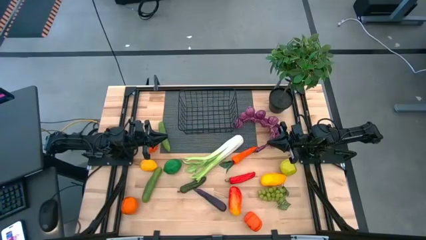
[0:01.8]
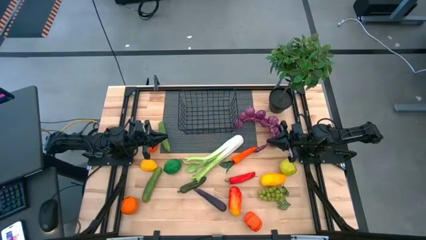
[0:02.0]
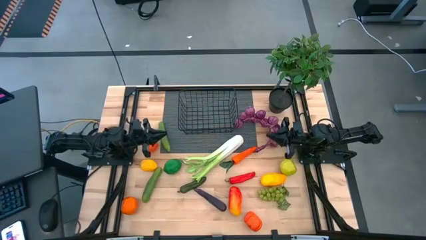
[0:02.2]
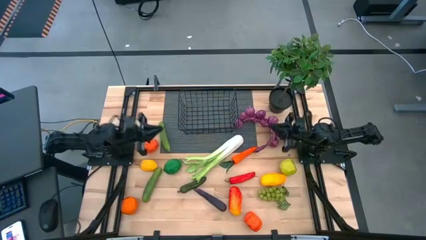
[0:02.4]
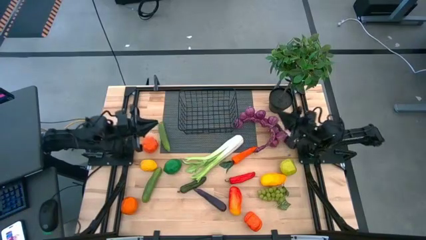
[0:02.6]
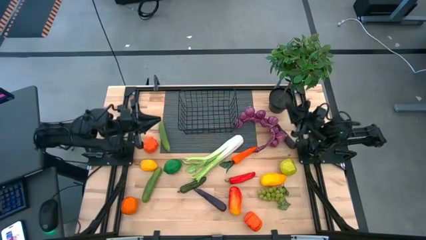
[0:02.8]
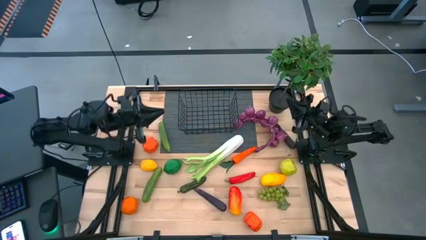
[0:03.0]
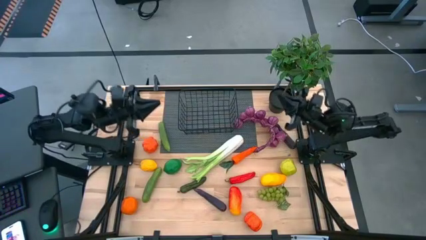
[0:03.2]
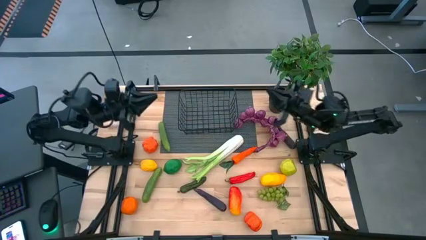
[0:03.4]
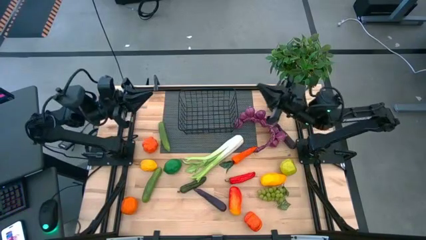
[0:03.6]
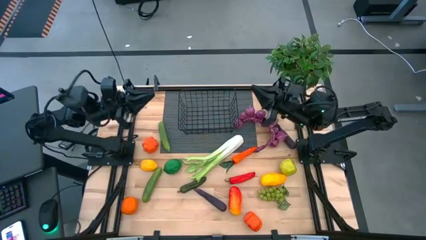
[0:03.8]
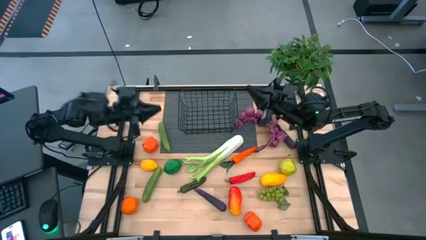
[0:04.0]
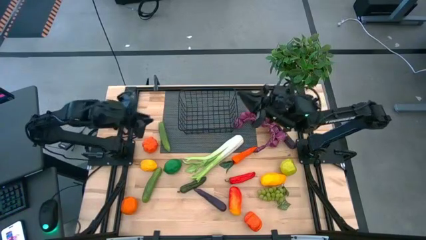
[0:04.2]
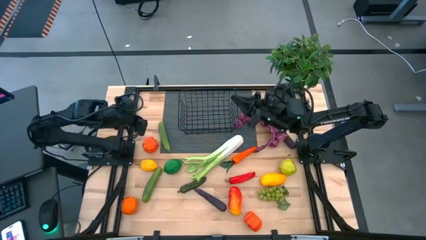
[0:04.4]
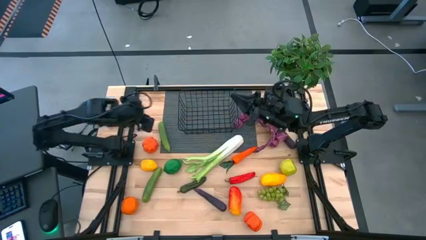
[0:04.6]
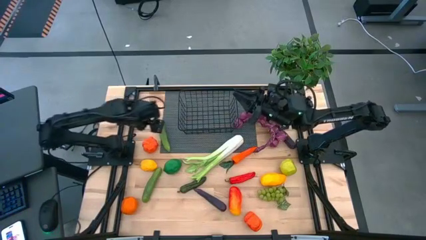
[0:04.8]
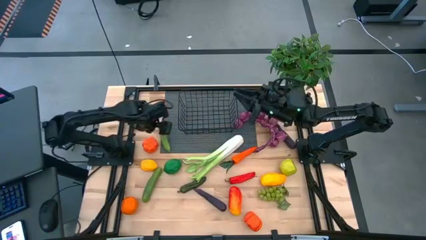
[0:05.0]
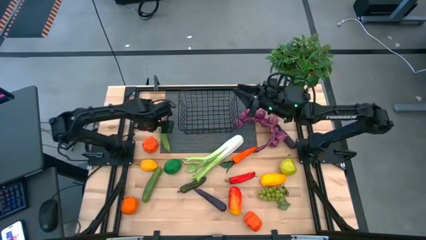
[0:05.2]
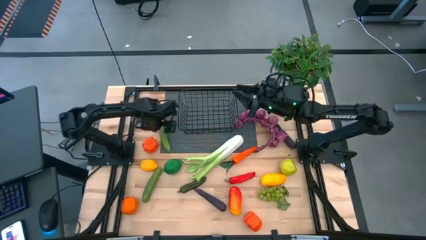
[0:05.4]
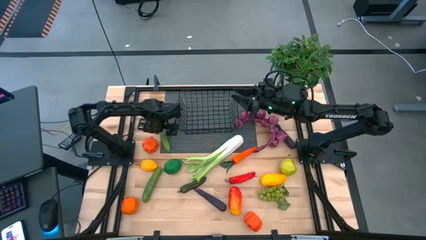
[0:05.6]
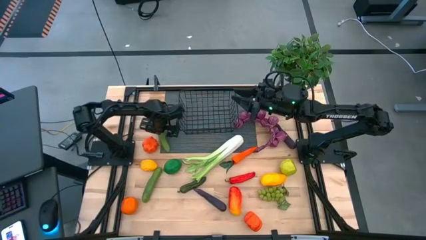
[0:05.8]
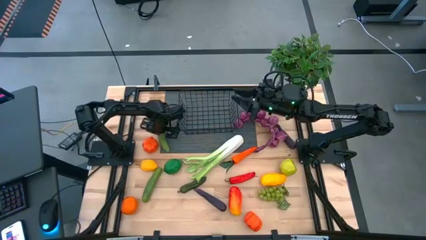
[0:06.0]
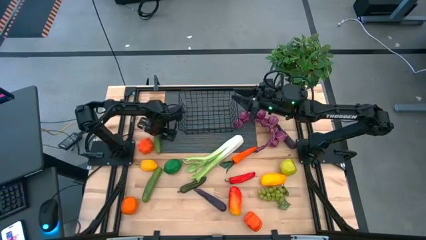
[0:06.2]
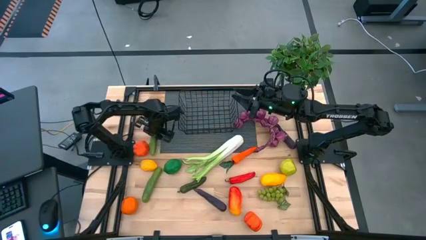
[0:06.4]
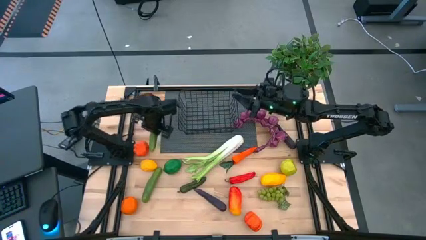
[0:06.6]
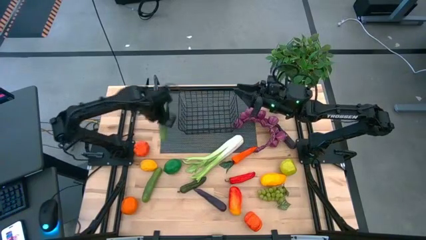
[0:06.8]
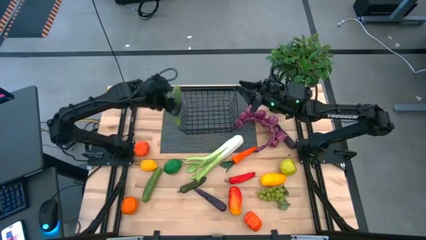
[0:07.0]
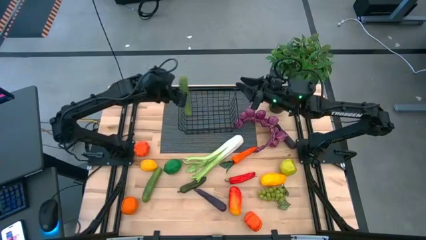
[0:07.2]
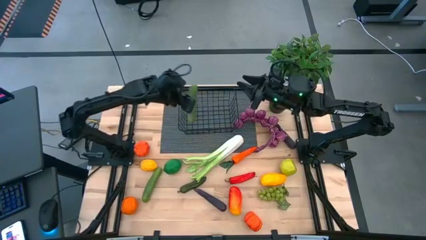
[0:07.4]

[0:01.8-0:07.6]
Task: Build produce basket
Put the top cucumber into the wire basket

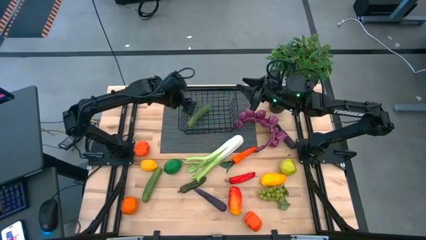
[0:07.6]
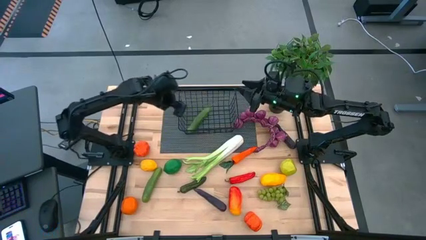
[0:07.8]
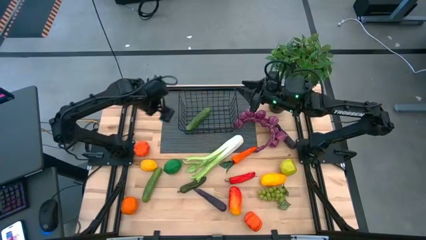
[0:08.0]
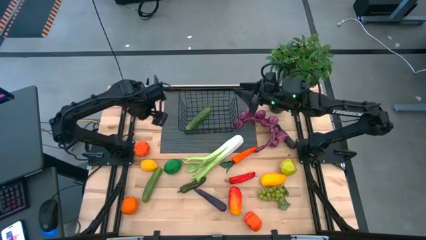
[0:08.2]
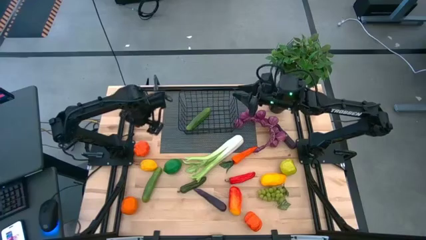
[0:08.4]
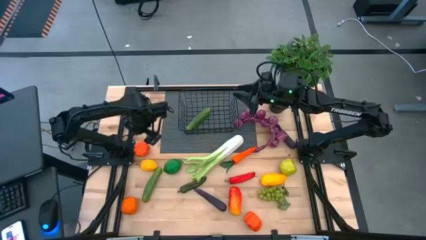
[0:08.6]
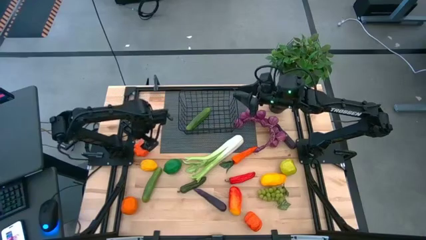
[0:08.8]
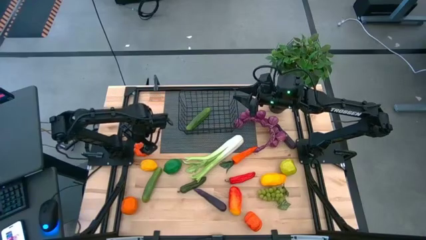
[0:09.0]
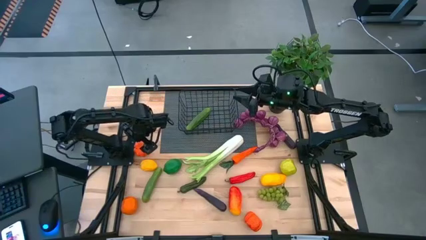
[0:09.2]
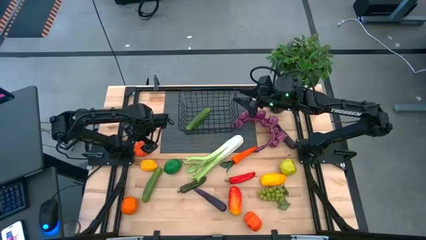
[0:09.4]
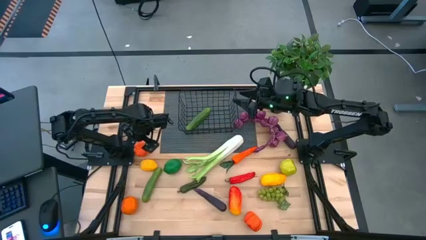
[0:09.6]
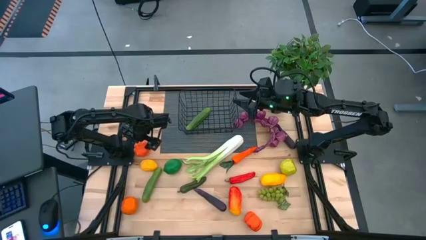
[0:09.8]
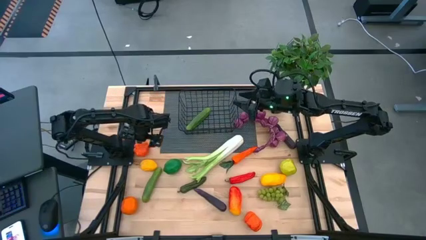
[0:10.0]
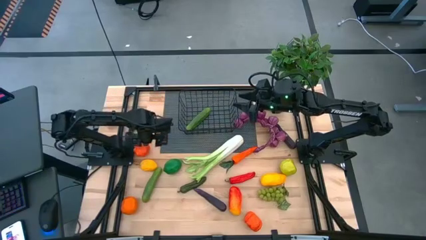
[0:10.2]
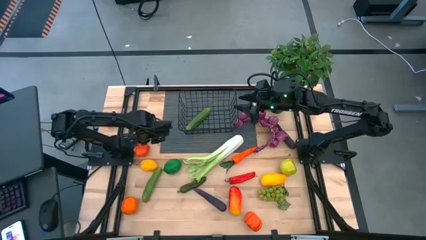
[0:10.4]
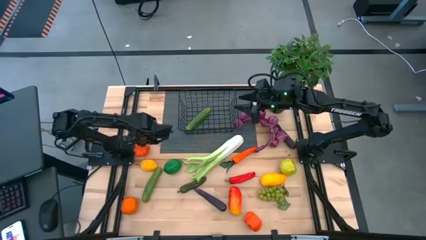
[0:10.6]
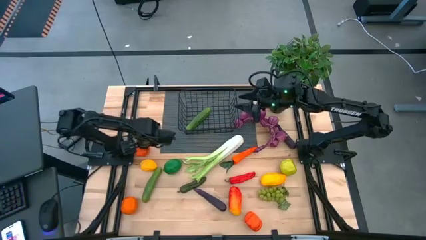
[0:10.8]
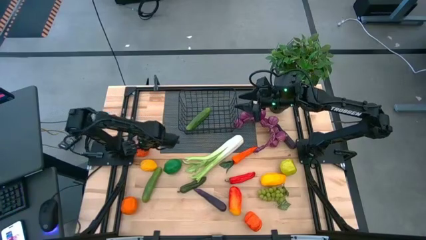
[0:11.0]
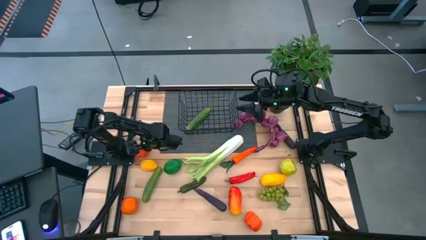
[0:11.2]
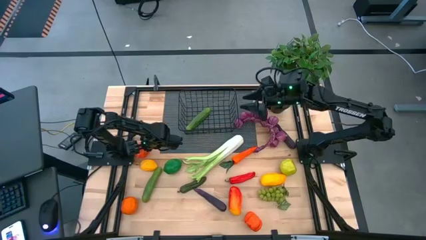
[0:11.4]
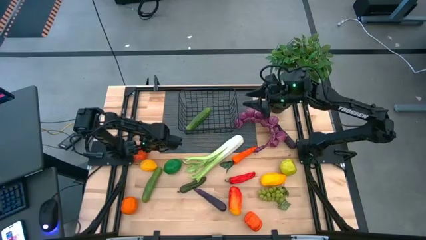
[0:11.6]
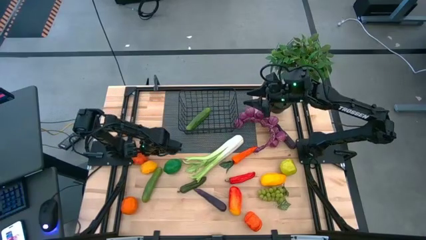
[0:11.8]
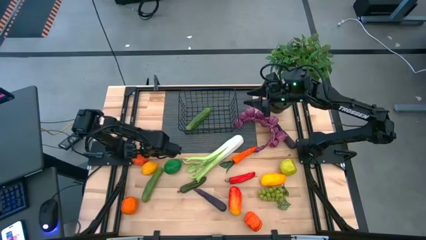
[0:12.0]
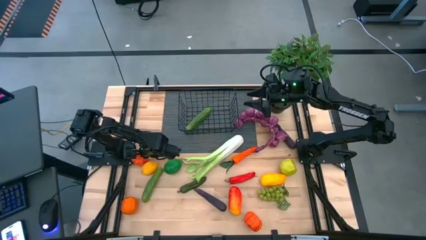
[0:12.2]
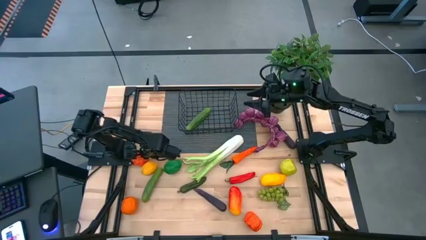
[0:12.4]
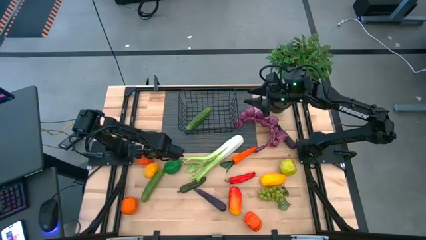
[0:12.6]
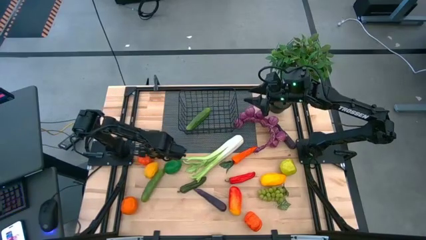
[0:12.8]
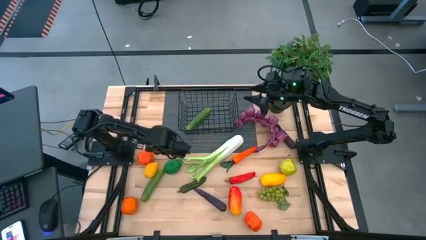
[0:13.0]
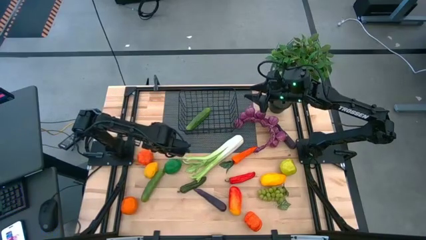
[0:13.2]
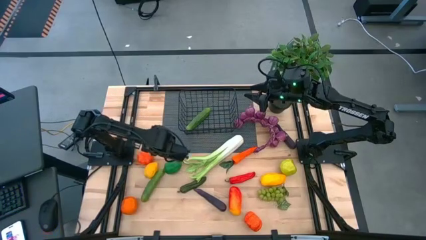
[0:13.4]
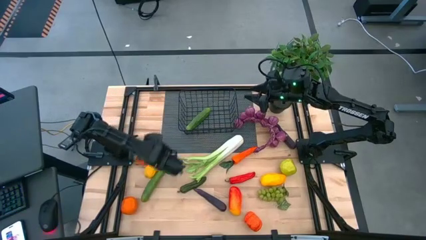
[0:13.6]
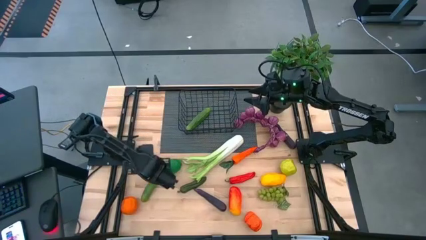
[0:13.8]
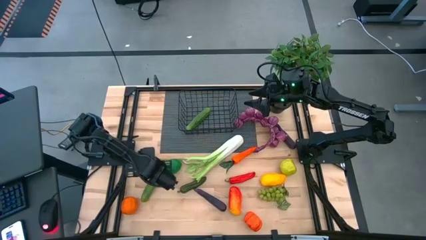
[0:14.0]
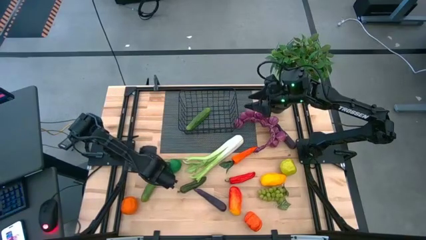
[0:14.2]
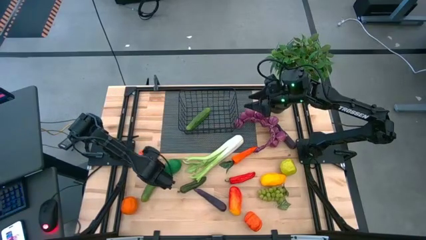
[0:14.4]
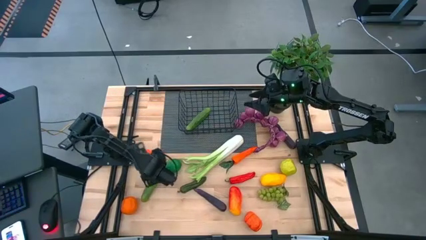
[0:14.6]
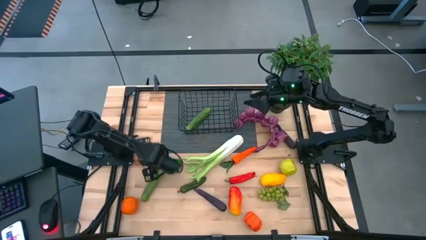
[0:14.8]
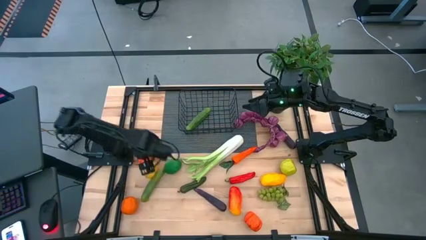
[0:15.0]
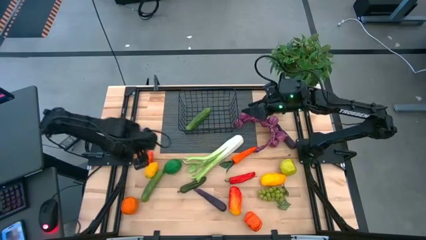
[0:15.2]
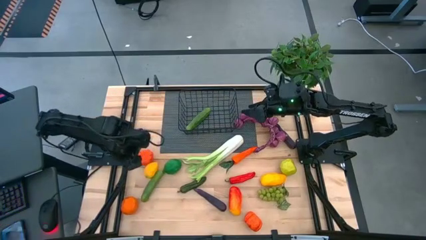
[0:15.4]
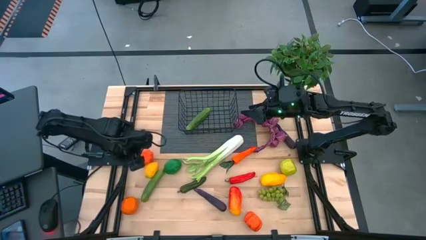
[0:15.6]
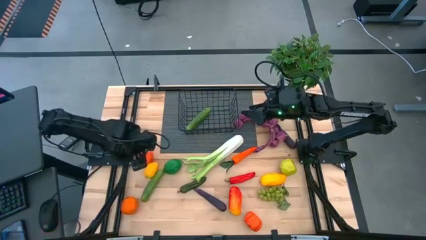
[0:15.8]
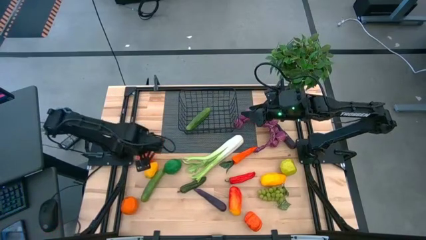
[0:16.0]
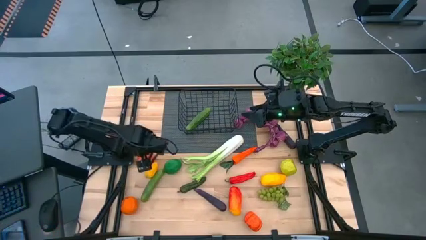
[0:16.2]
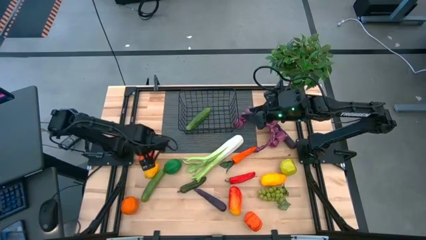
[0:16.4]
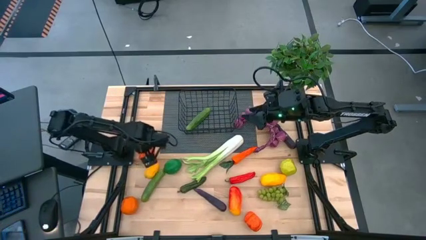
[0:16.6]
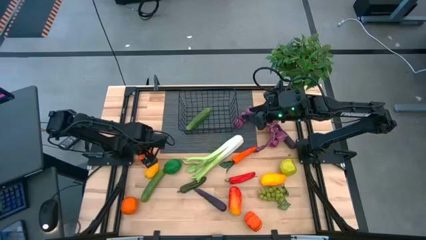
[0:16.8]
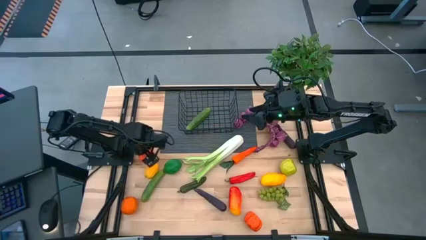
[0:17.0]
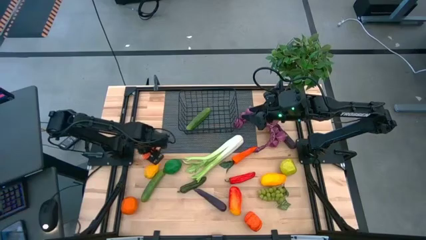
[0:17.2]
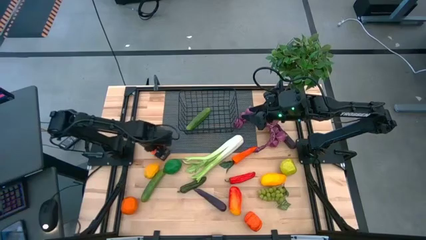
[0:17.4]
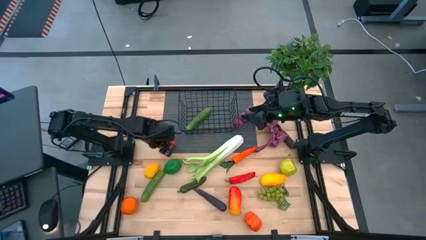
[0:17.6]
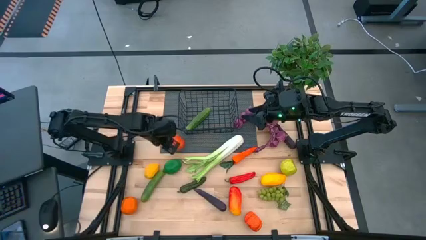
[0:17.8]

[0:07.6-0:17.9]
Put the top squash into the wire basket

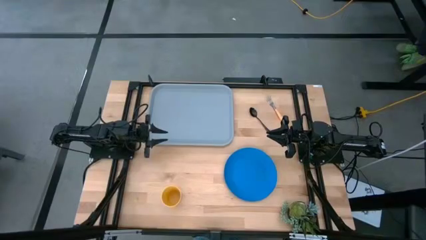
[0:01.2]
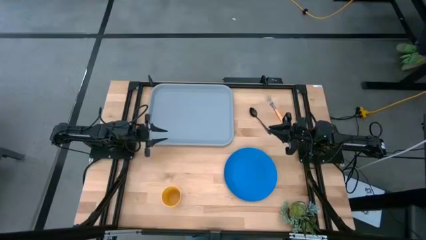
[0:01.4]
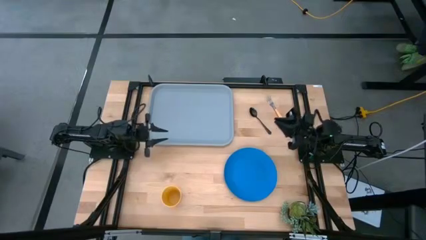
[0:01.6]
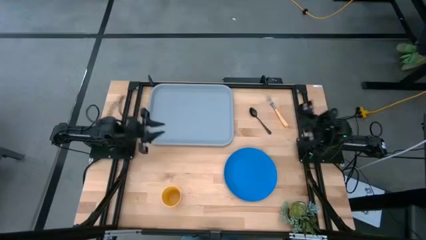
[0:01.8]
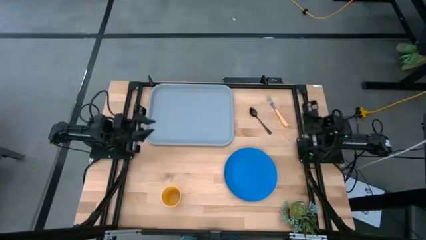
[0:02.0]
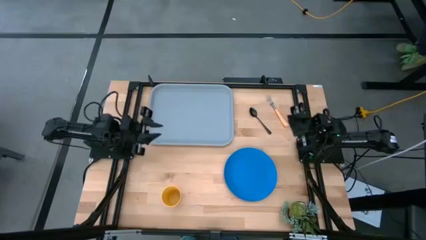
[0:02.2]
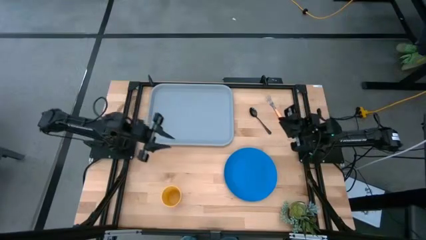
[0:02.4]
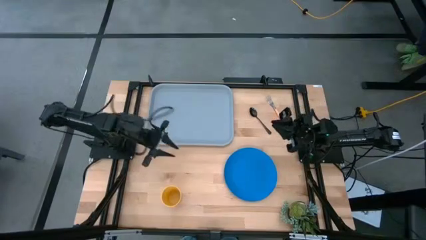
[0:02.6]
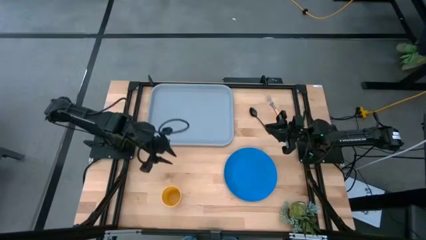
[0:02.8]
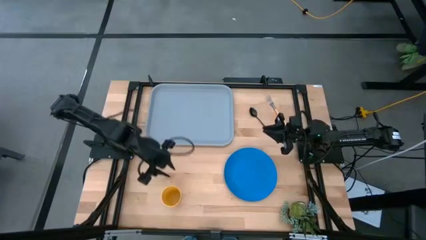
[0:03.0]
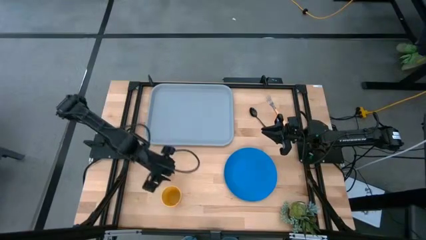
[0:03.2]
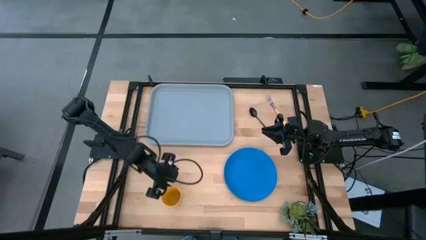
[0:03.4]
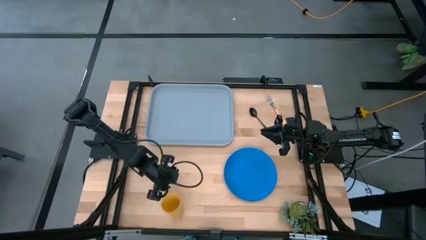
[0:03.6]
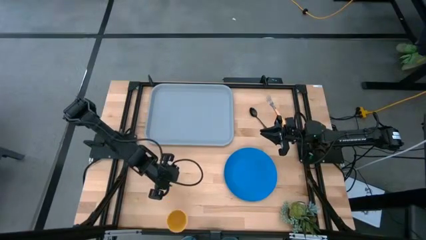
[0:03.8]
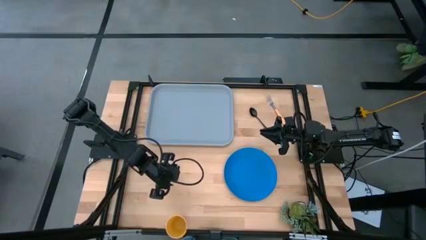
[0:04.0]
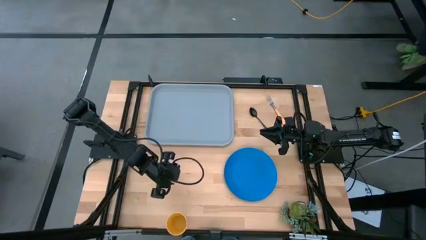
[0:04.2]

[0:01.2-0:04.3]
Task: Pick and place plate/cup/fork/spoon on tray
Put the yellow cup on the gray tray
